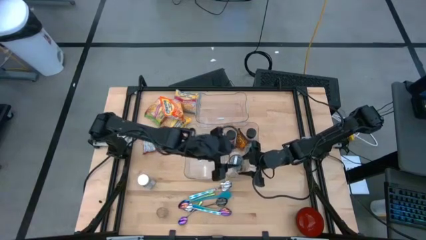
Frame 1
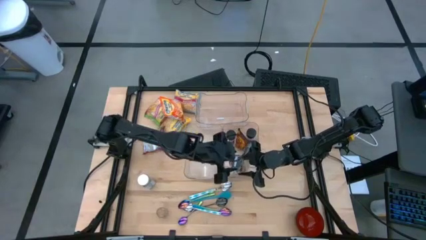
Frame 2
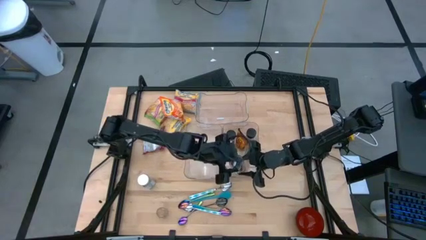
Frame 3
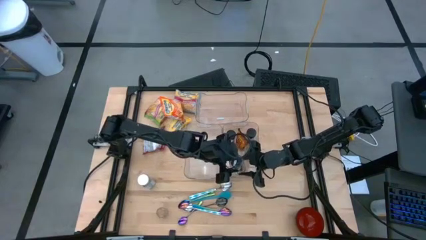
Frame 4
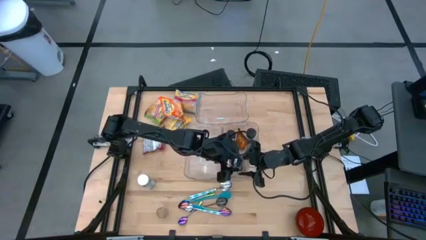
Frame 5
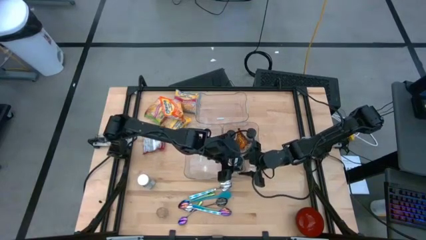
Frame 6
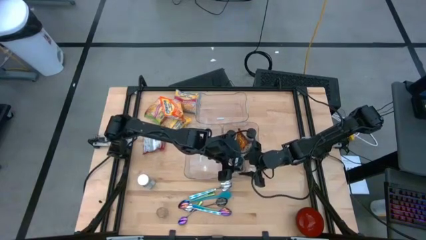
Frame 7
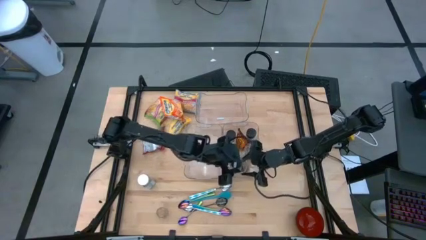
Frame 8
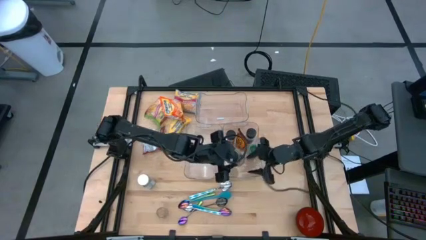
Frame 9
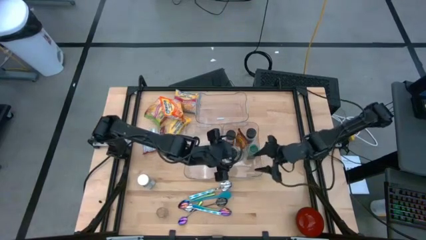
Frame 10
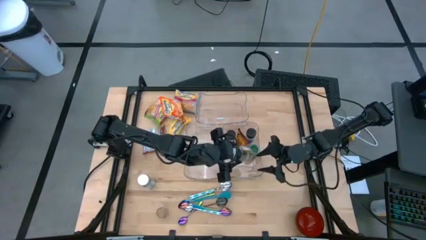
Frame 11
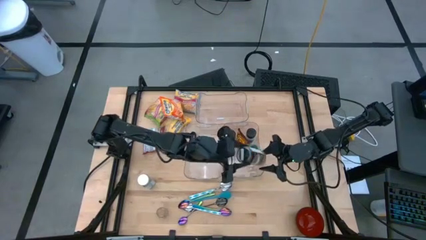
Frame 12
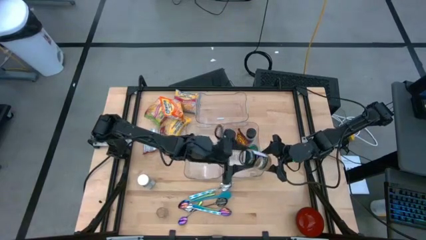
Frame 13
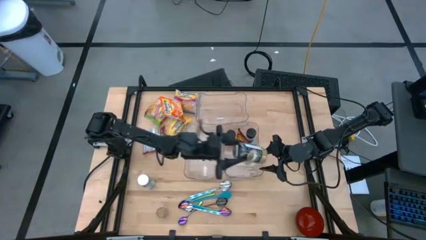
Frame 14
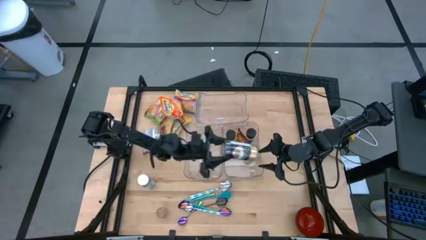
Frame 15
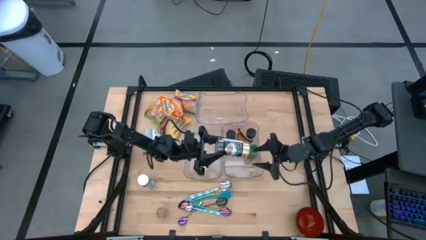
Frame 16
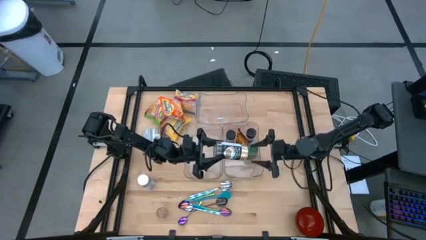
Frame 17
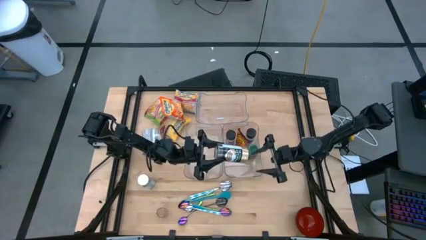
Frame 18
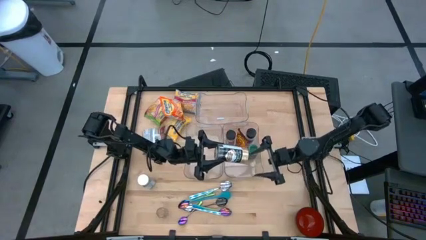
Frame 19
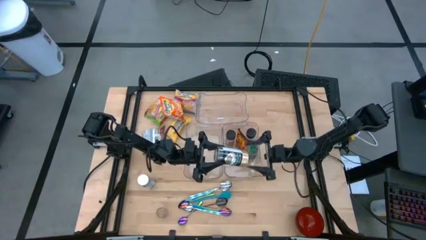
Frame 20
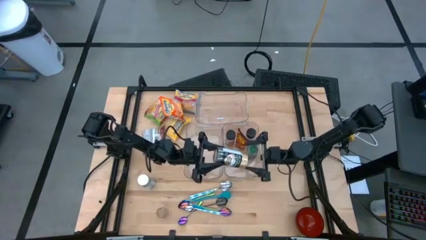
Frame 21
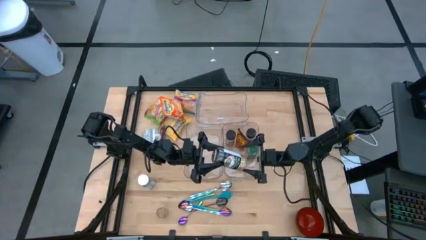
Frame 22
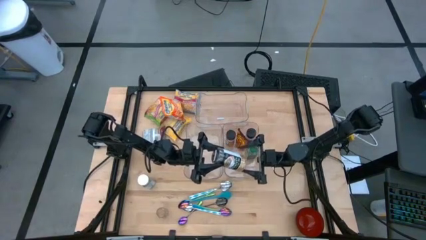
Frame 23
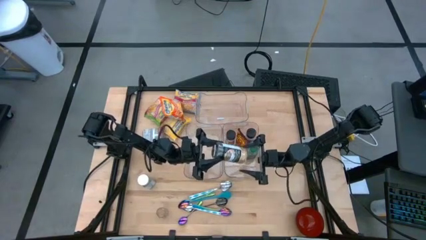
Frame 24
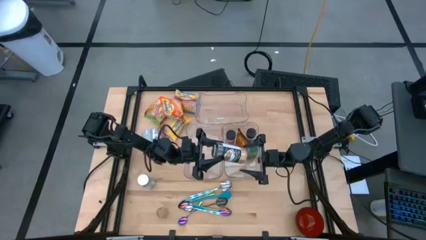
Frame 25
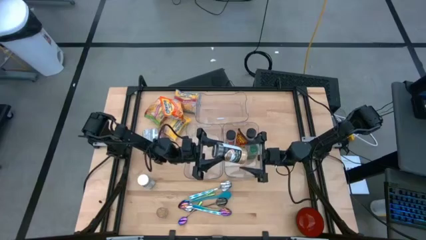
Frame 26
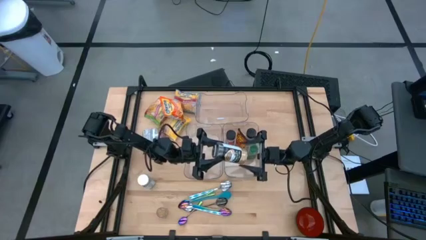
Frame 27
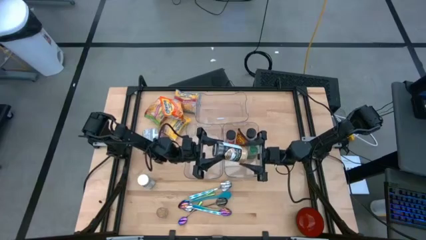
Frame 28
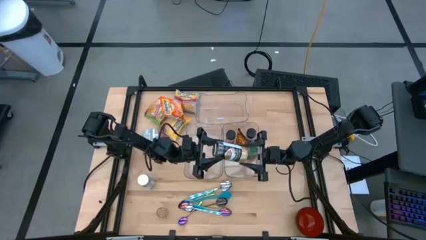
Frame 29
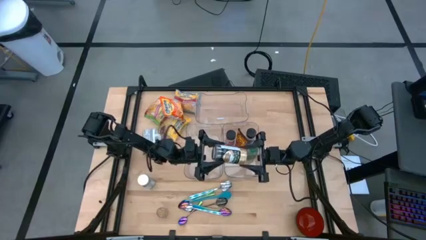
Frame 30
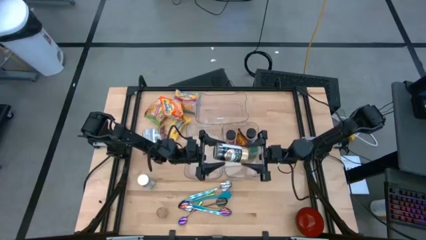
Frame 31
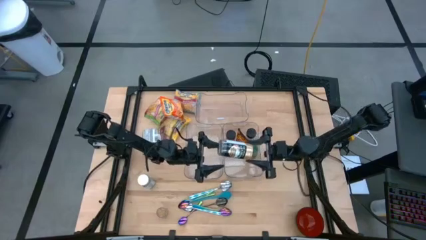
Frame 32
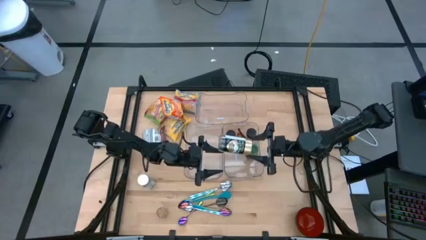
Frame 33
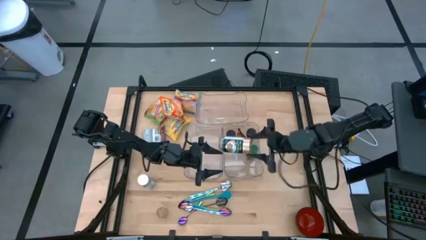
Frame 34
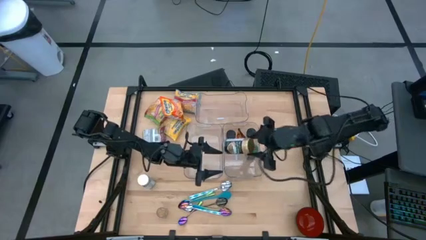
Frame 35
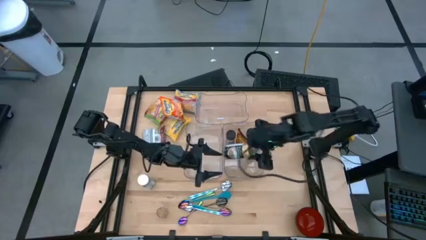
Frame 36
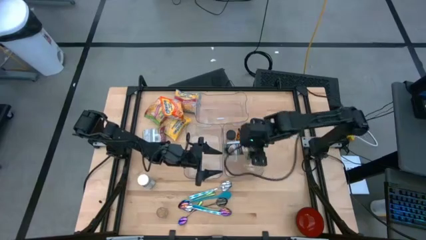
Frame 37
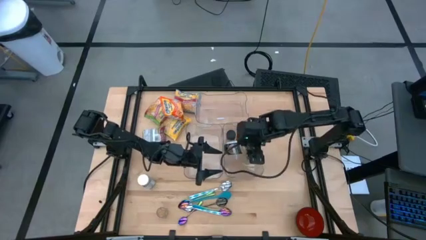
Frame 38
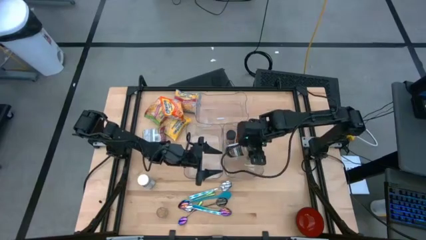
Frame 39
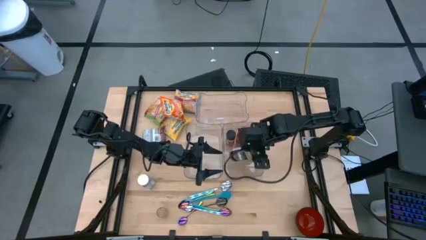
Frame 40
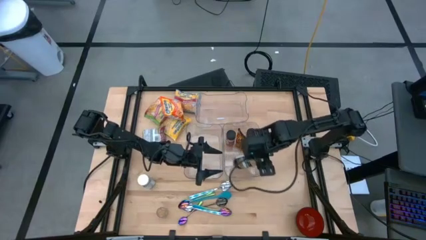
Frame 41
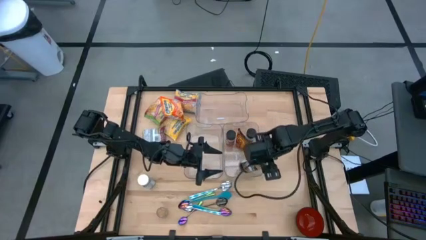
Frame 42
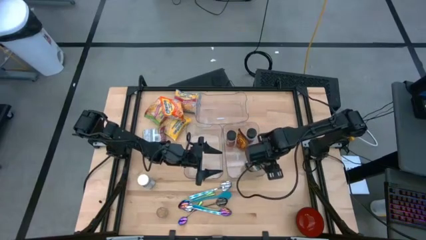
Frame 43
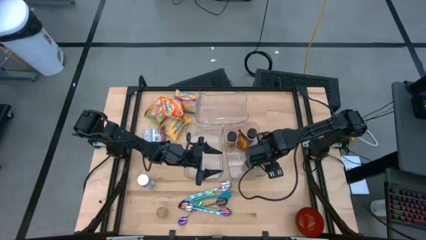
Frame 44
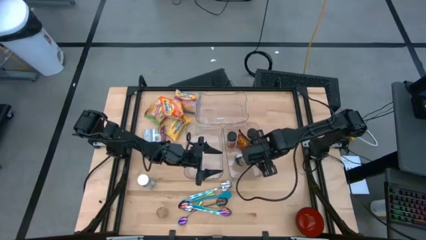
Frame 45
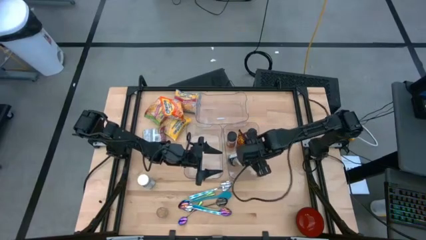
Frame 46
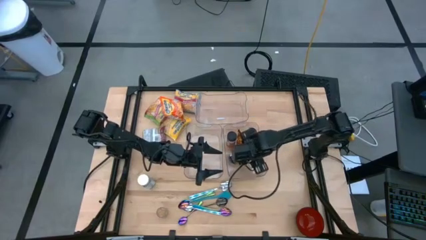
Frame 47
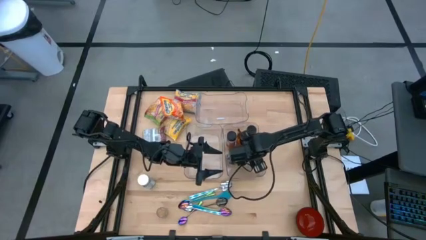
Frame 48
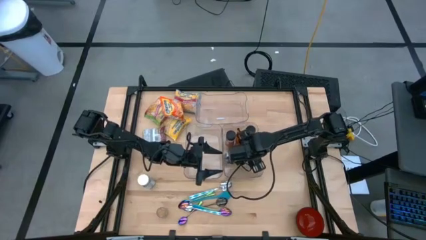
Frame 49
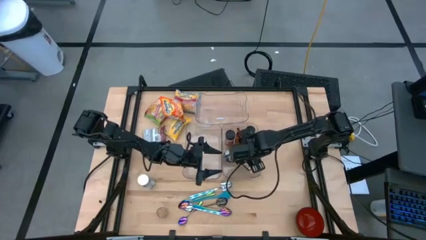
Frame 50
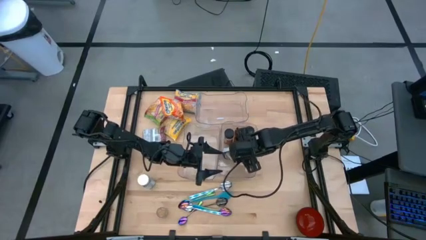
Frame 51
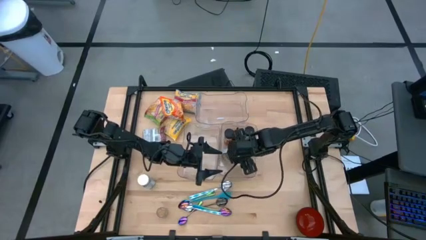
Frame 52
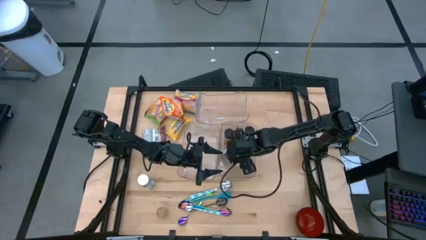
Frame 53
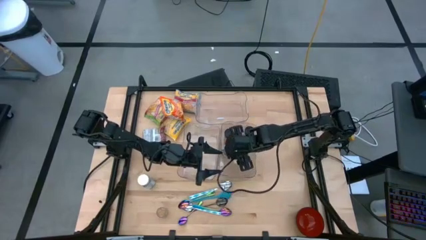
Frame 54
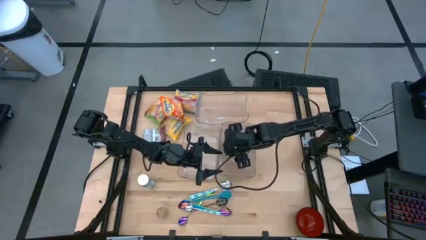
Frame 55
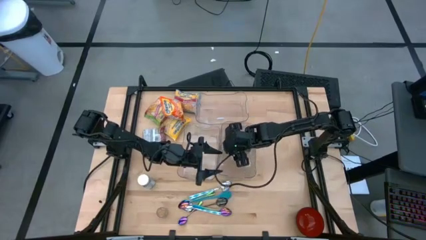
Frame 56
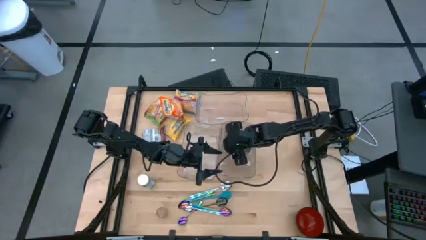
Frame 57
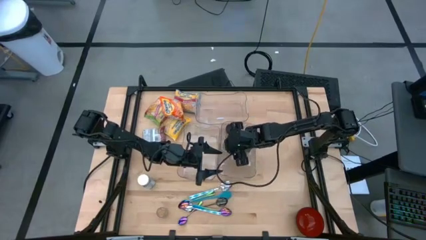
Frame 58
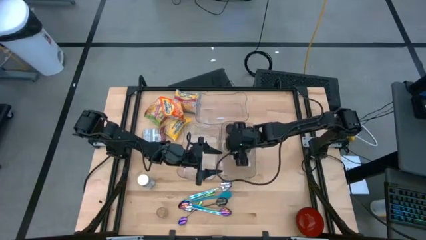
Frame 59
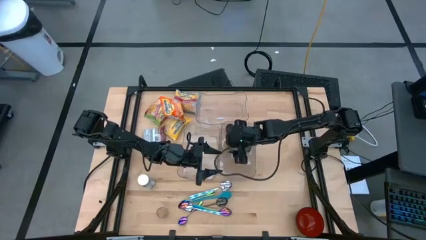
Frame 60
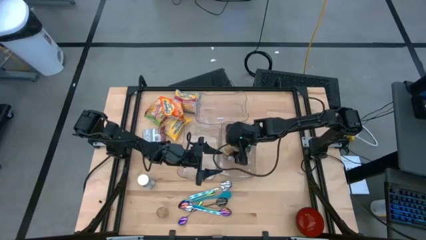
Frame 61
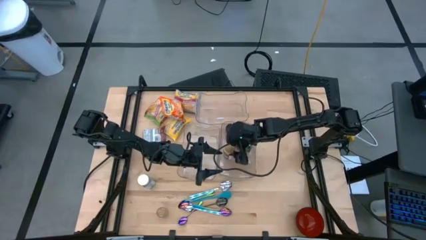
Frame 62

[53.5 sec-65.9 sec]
Task: Pick & Place Food Item
Put the gold seasoning bottle into the bottom right transparent bin

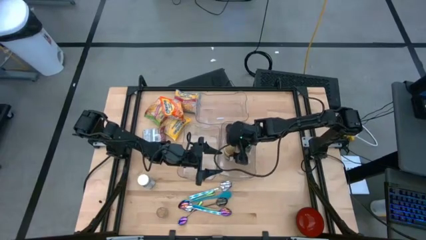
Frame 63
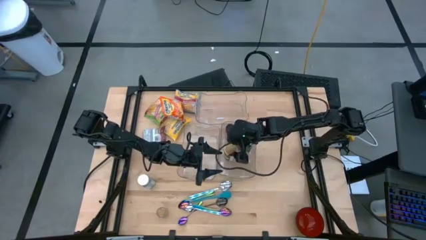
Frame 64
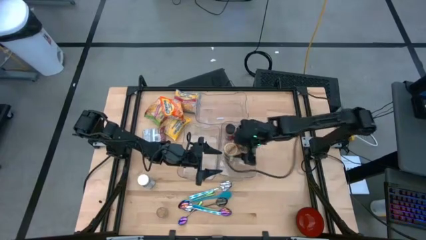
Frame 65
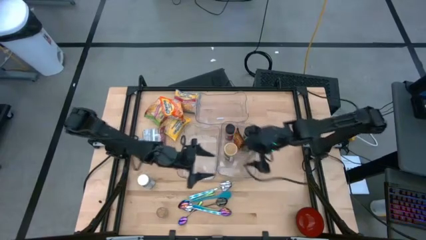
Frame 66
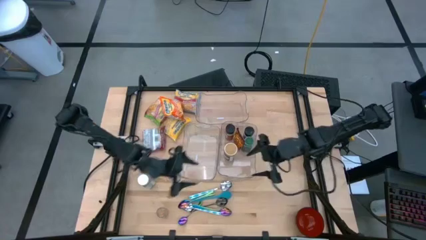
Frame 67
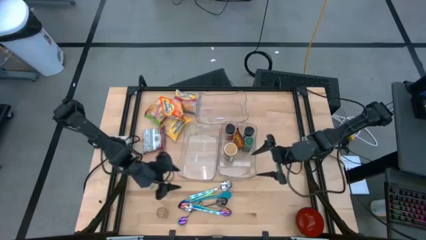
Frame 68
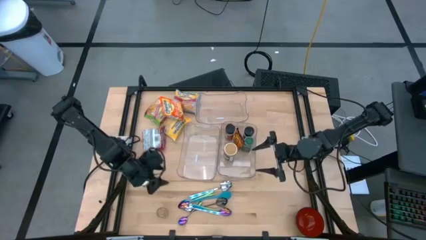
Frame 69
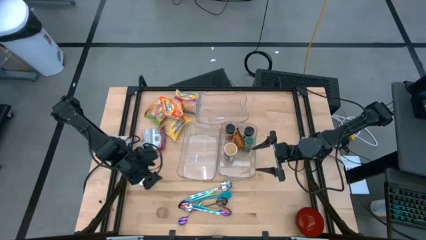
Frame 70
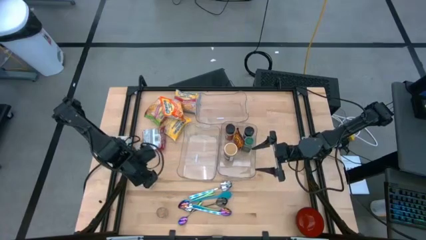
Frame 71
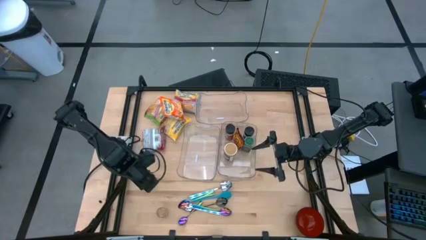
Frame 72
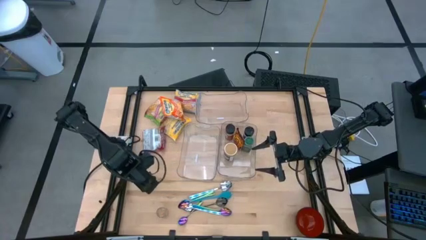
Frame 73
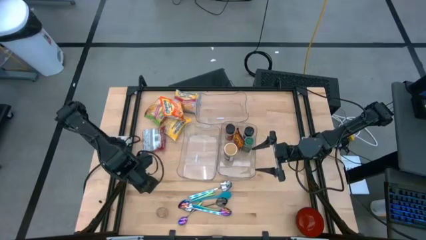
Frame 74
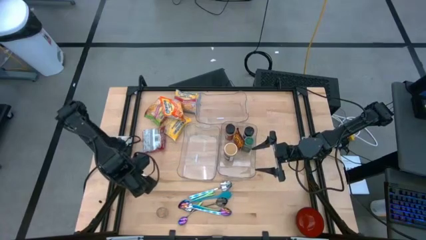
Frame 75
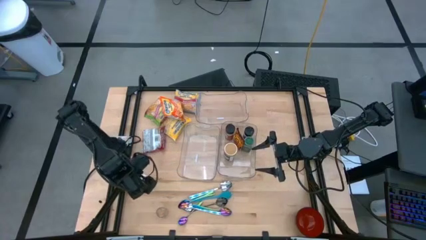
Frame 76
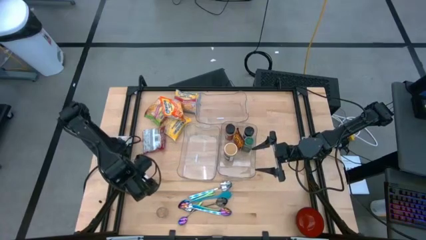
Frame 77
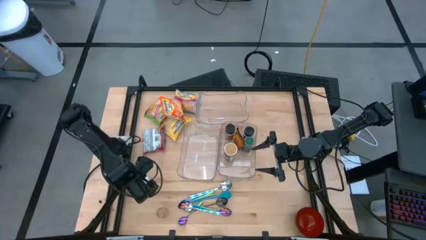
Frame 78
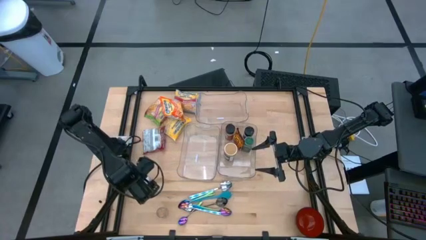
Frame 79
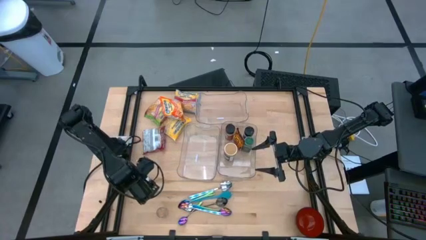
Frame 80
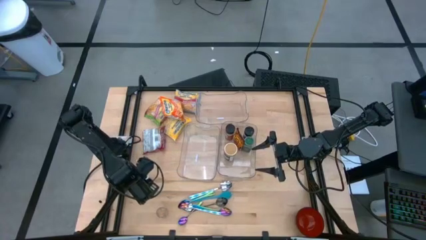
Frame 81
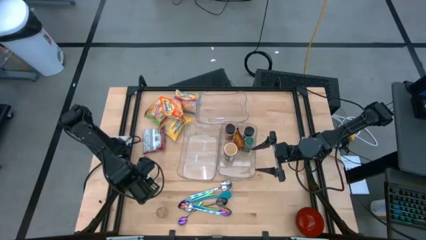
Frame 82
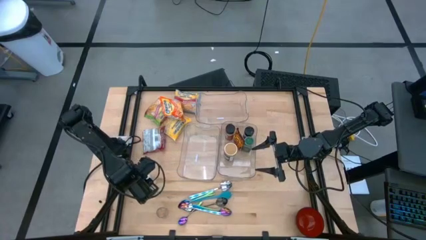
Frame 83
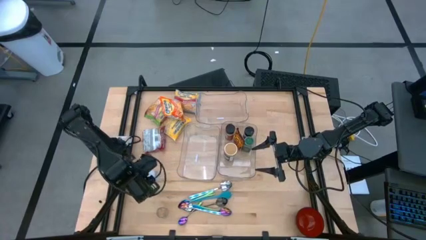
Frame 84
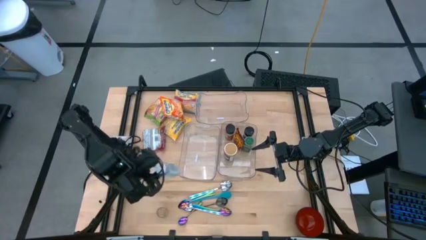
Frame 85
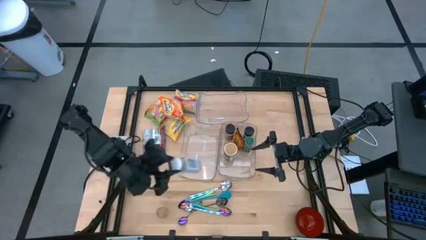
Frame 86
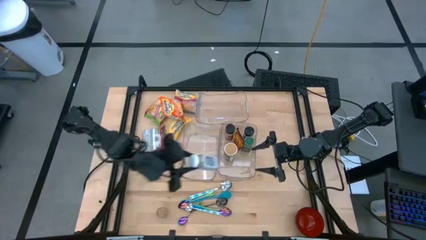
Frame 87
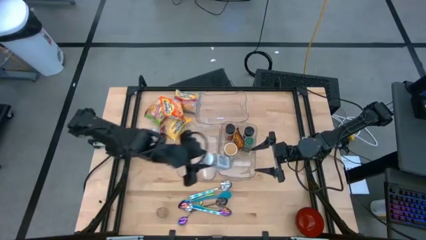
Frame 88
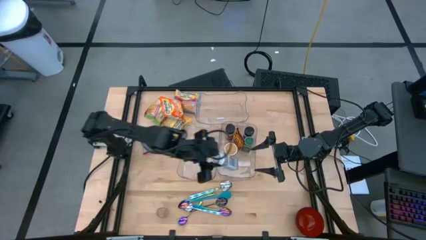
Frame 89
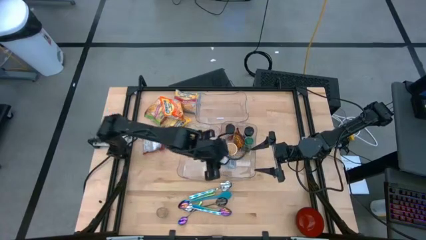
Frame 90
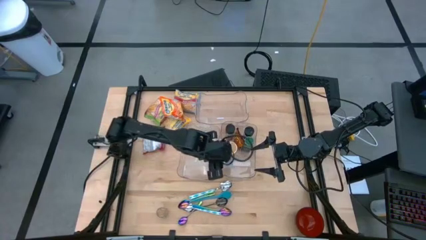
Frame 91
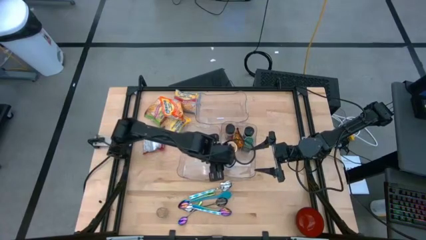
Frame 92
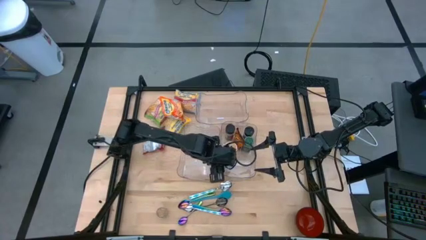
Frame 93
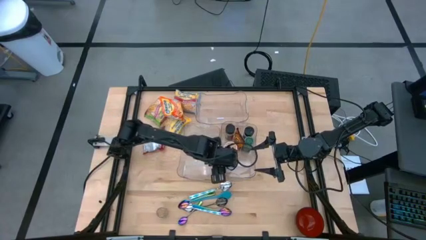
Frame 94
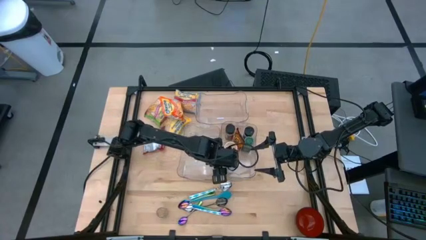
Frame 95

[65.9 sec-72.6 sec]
Put the white seasoning bottle into the bottom right transparent bin
